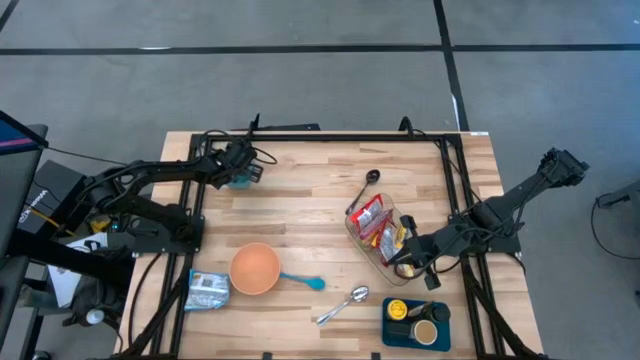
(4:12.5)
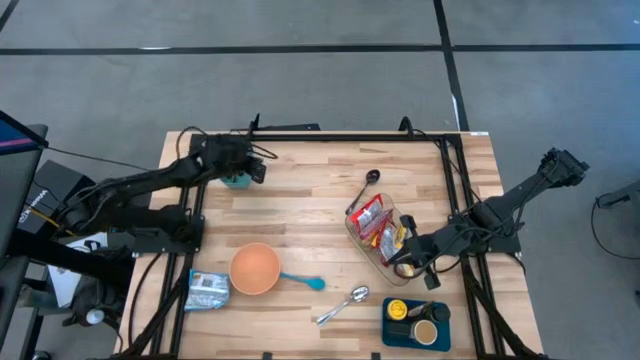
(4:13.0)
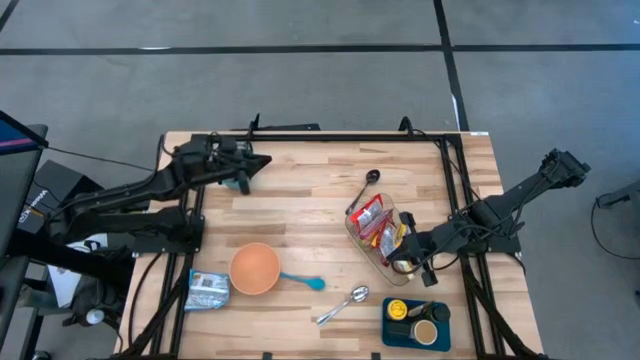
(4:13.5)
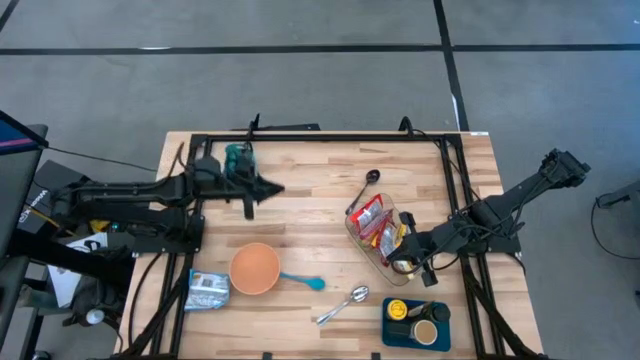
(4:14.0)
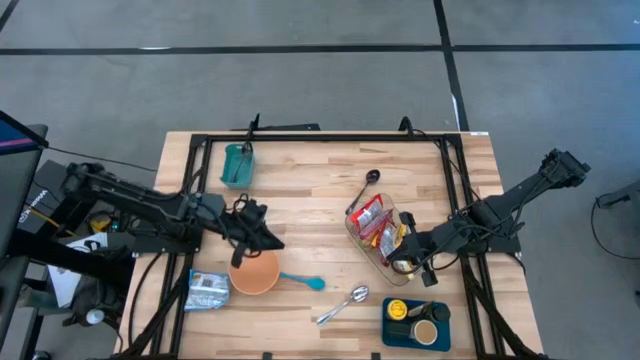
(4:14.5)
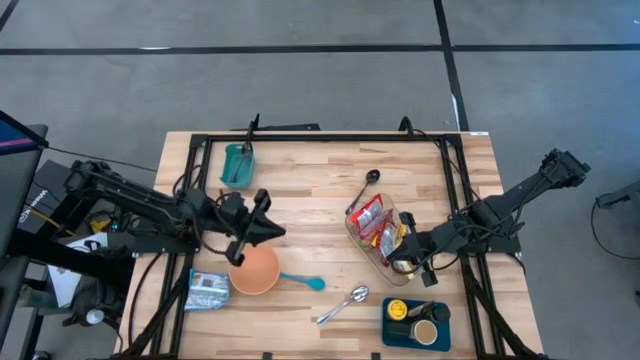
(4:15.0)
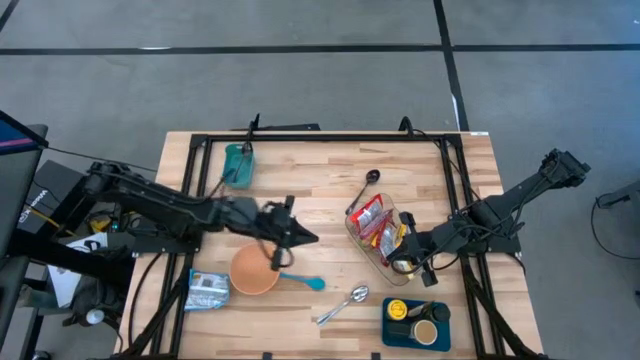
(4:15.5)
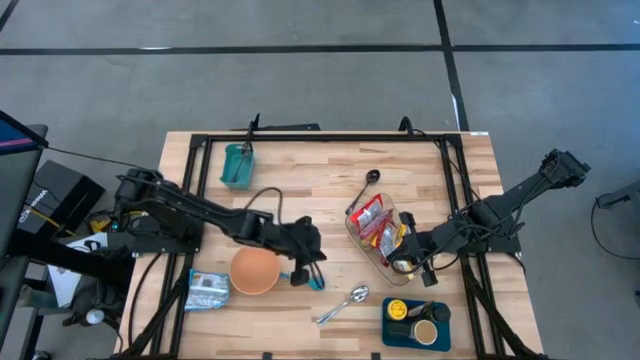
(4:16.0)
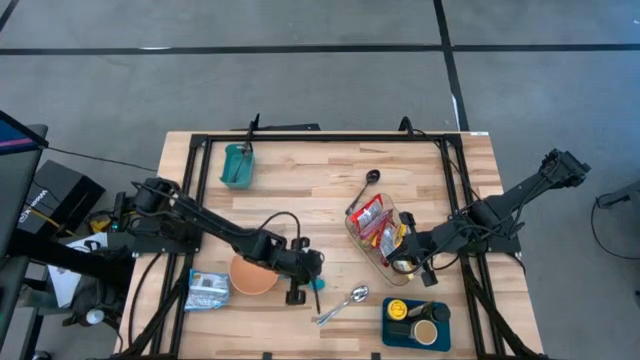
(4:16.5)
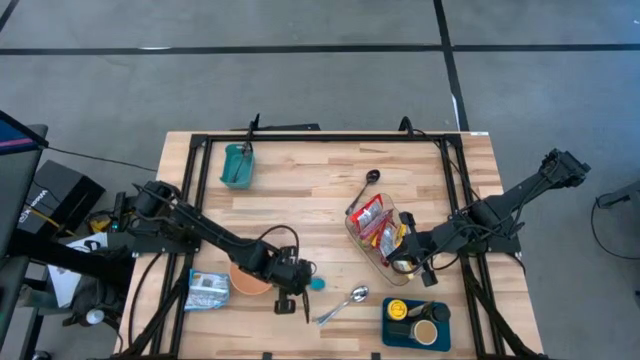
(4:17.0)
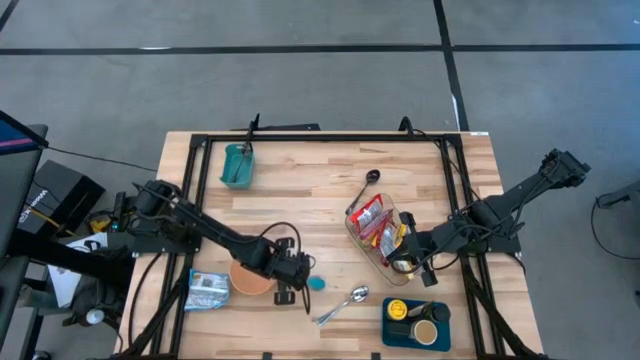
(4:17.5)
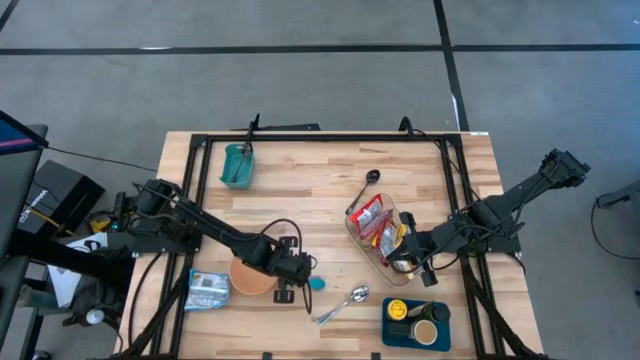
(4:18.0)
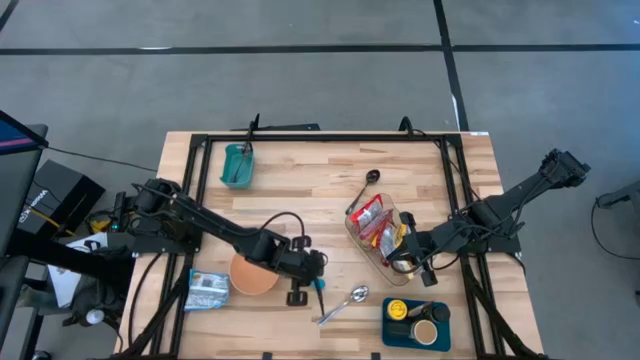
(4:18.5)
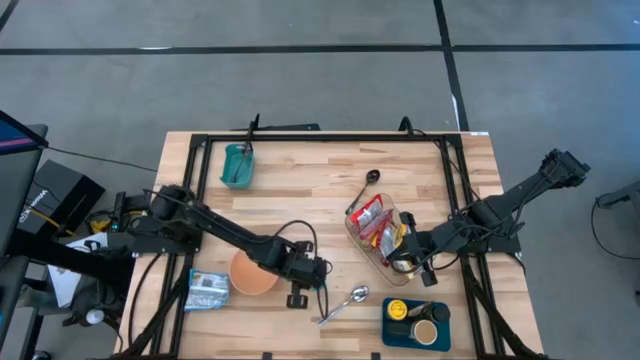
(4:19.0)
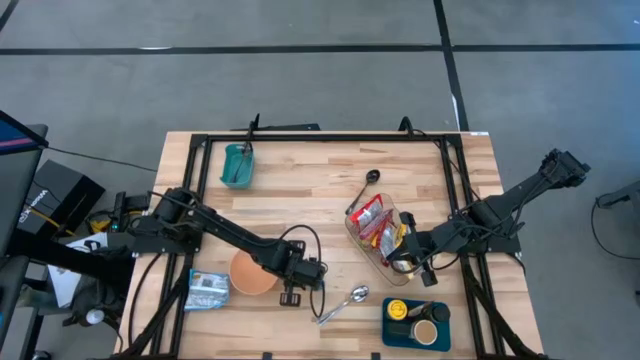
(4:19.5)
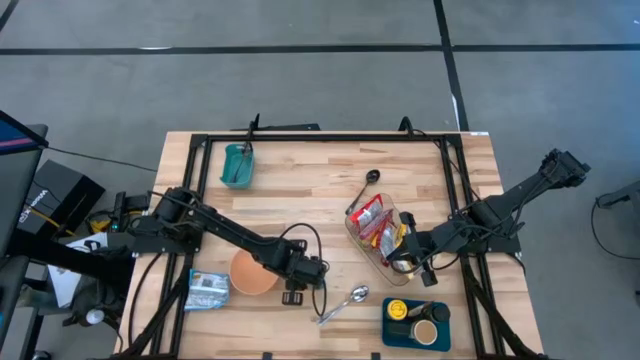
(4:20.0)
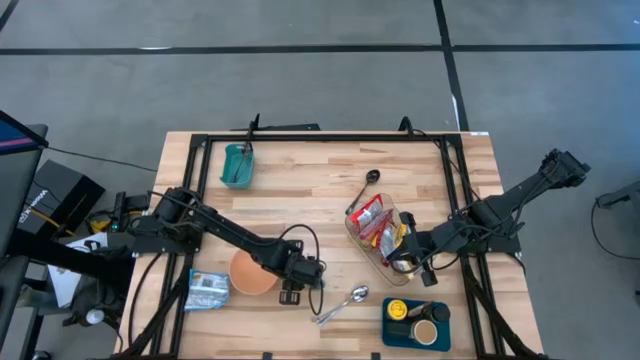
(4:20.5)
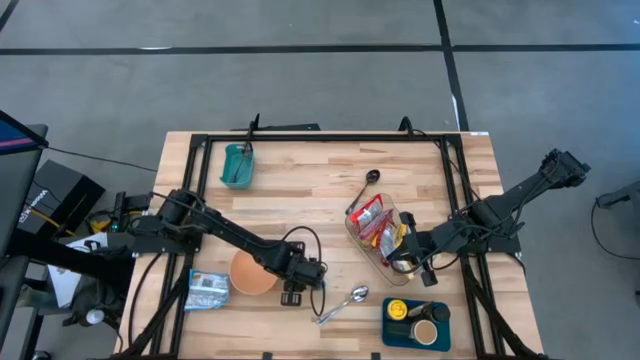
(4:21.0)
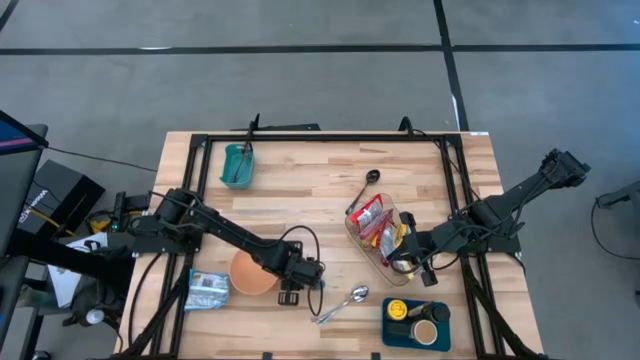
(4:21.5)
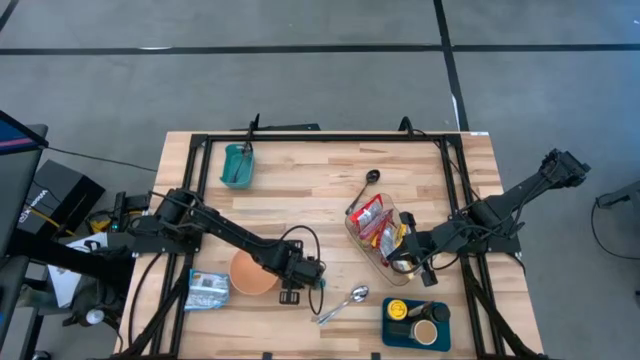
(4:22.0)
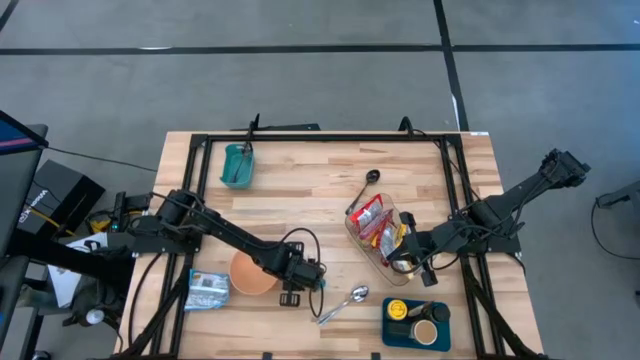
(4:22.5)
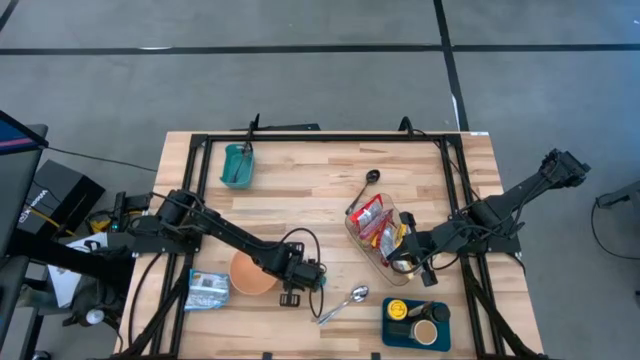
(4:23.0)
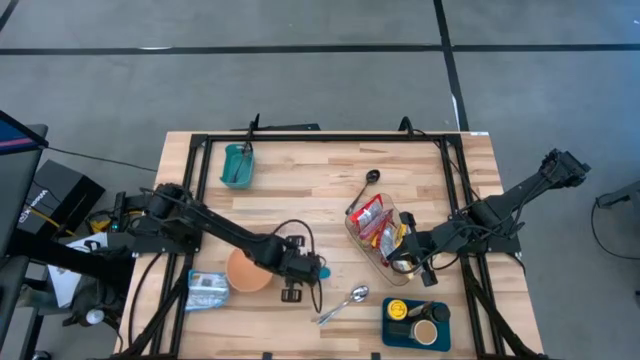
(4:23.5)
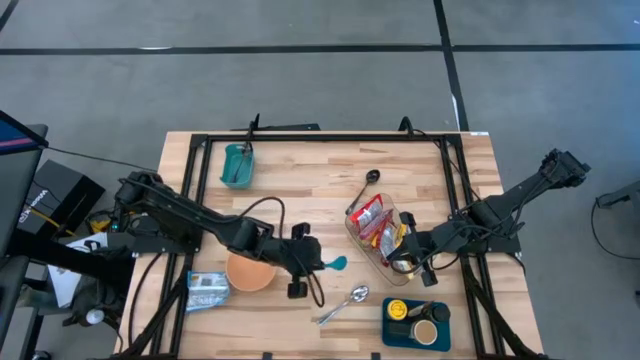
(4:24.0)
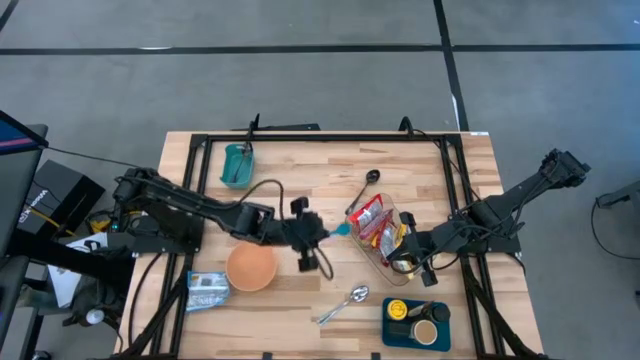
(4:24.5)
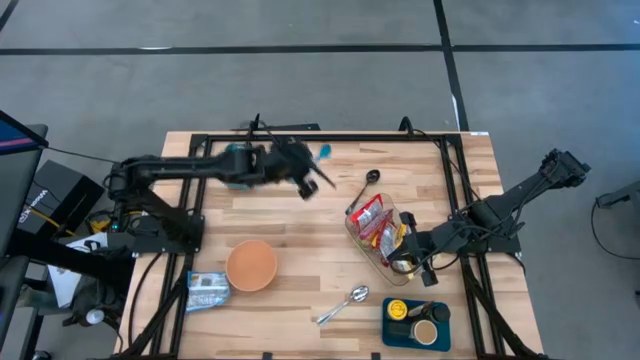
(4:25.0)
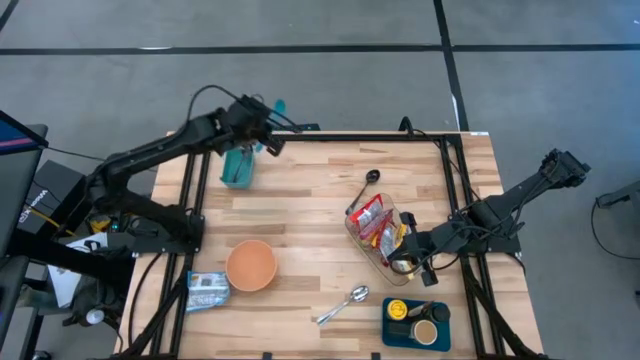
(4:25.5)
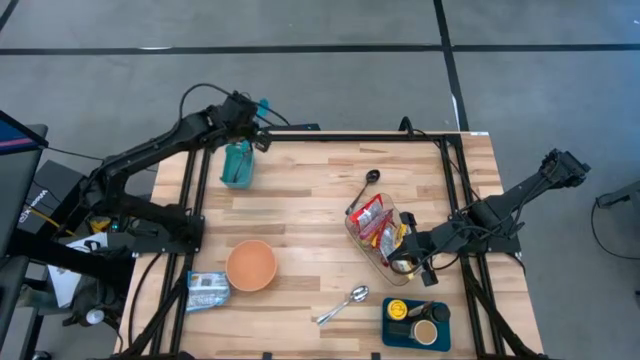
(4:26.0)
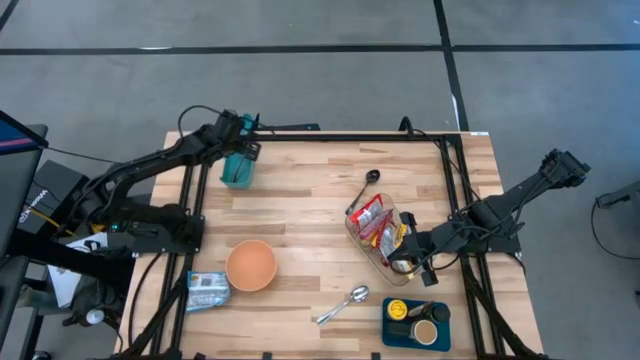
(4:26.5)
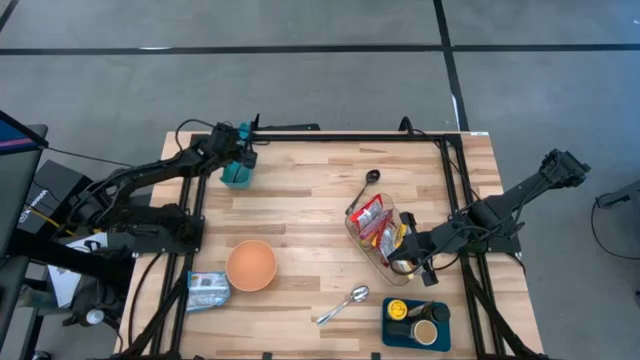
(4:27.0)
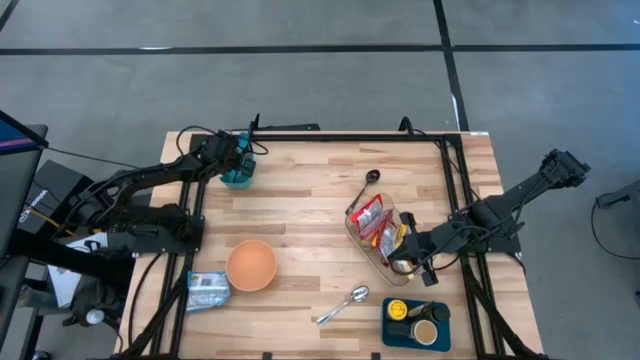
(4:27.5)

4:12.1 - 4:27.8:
Task: Pick & Place Food Item
Put the blue baby spoon into the green bin

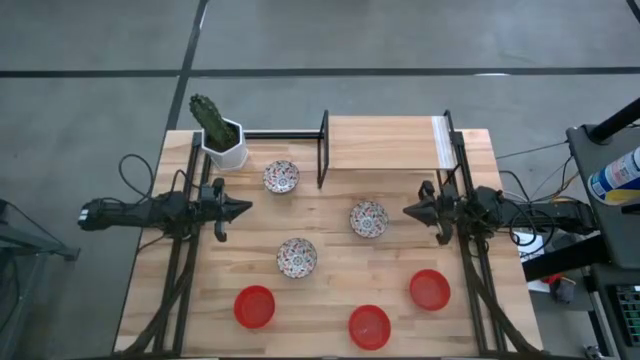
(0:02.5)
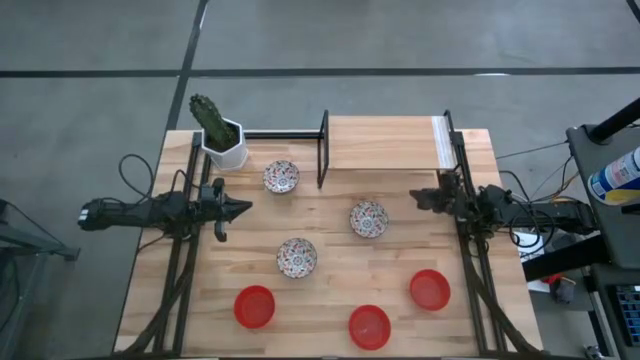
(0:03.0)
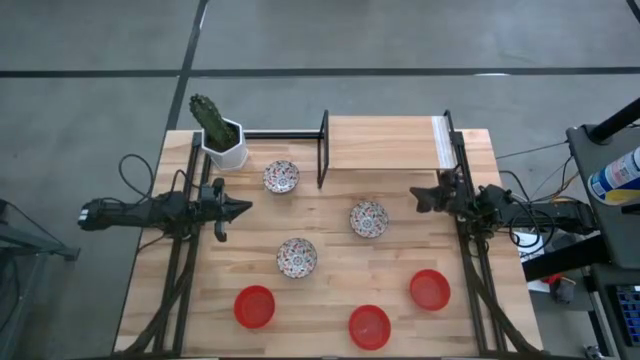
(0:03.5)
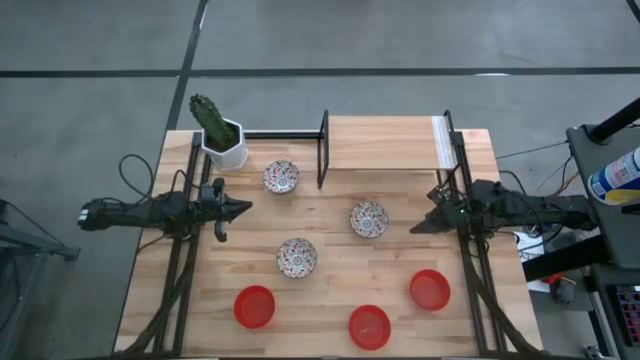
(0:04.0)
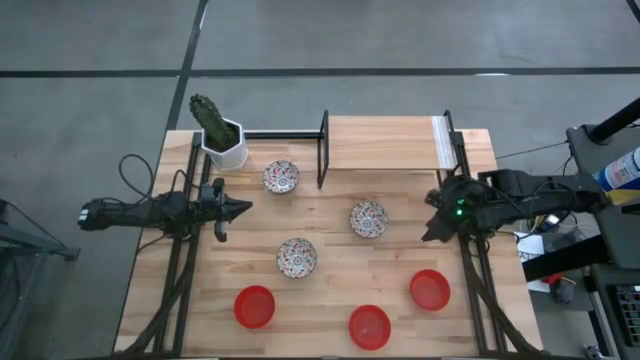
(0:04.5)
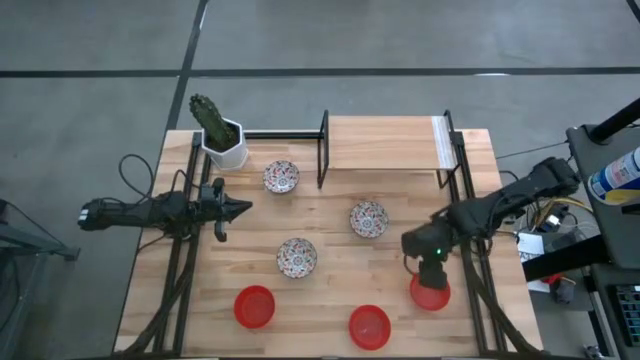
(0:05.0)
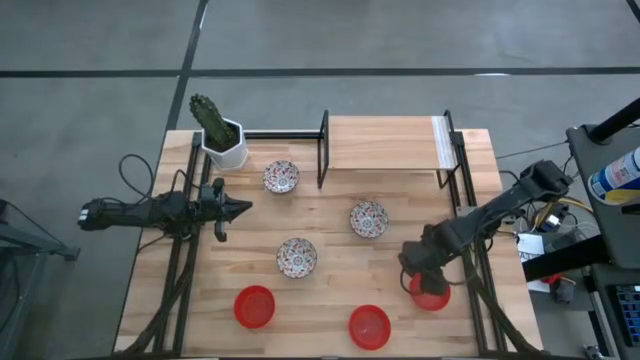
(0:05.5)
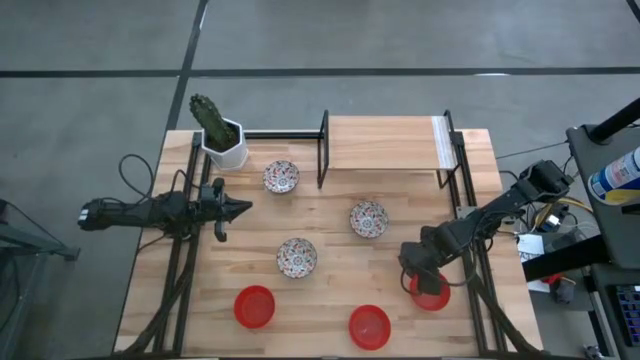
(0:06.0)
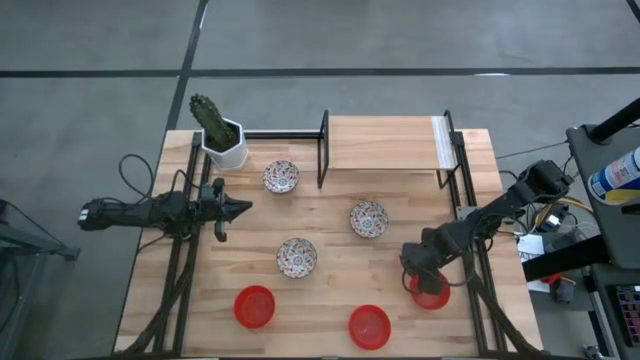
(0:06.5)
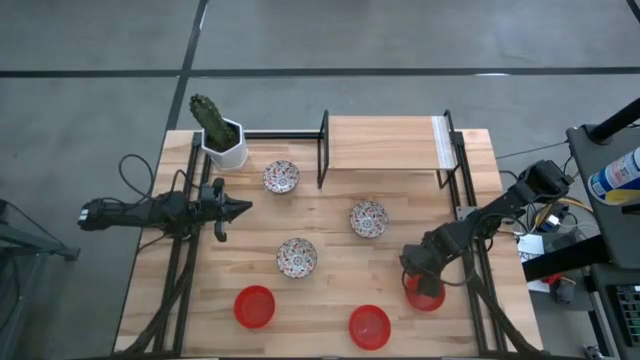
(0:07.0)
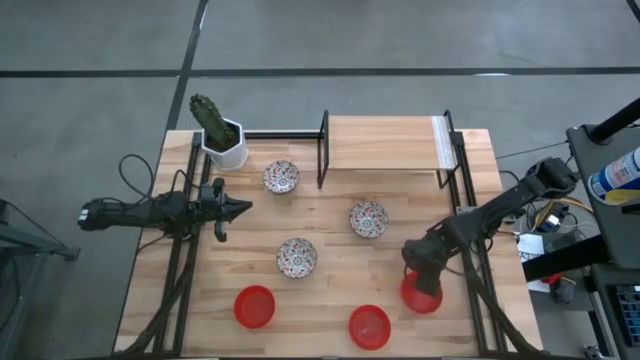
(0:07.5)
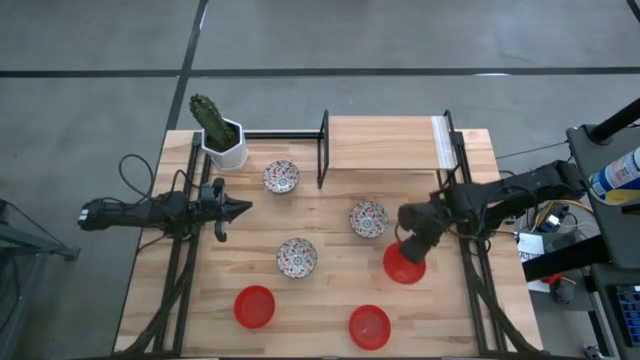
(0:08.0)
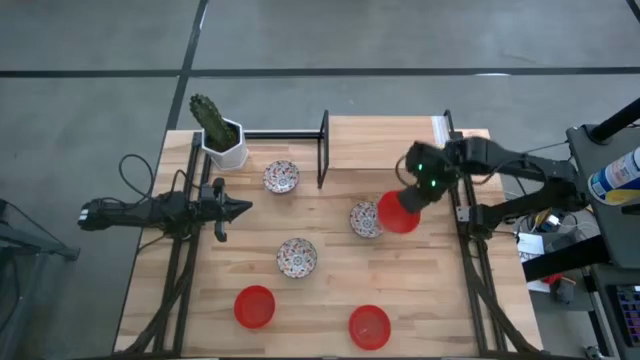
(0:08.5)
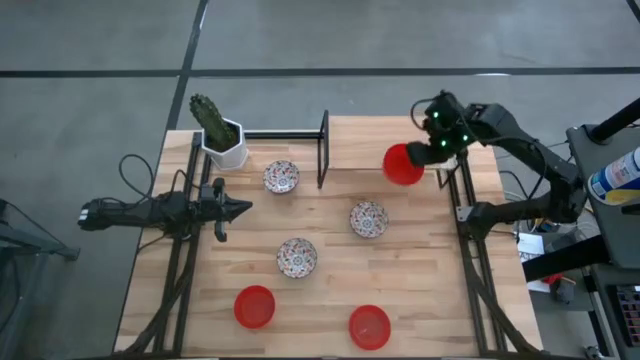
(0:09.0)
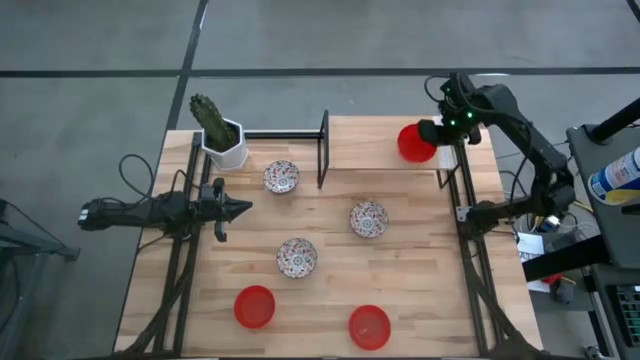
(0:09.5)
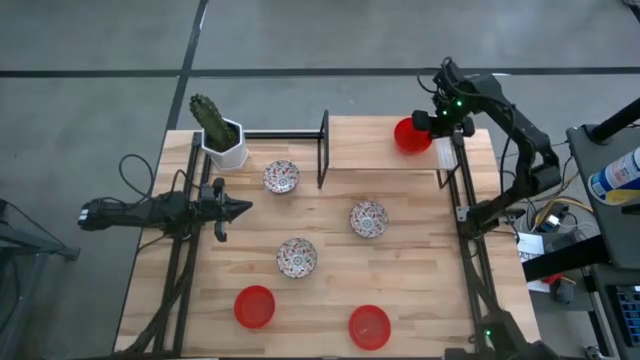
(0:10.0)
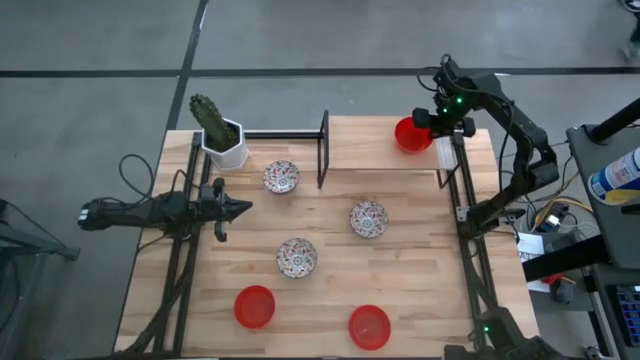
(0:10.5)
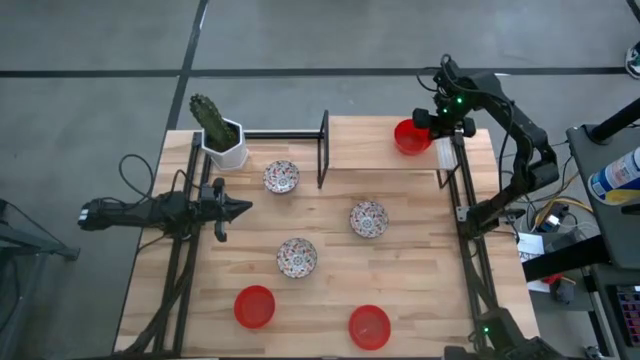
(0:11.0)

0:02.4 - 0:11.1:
Task: Pick & Place Mini bowls
Put the red bowl on the shelf
